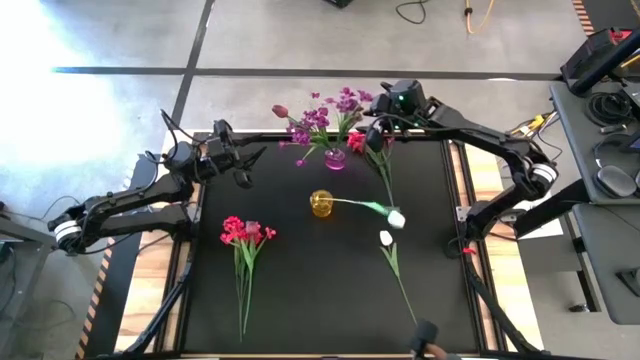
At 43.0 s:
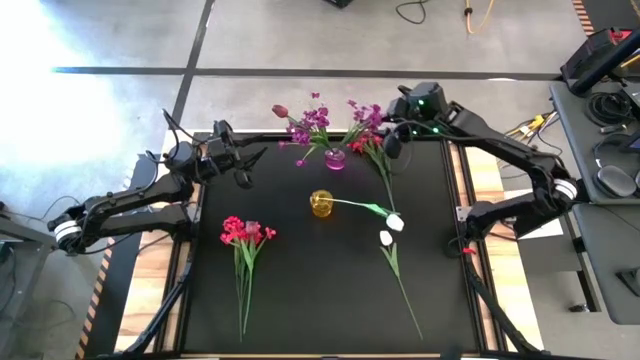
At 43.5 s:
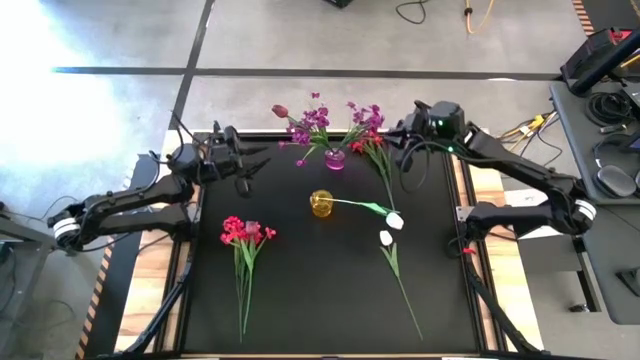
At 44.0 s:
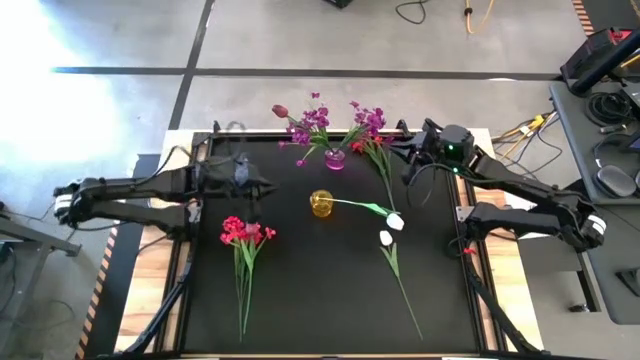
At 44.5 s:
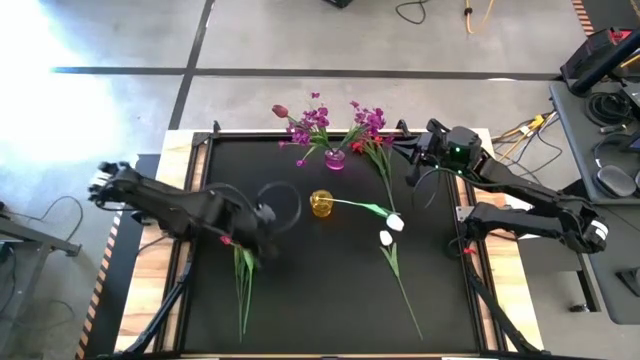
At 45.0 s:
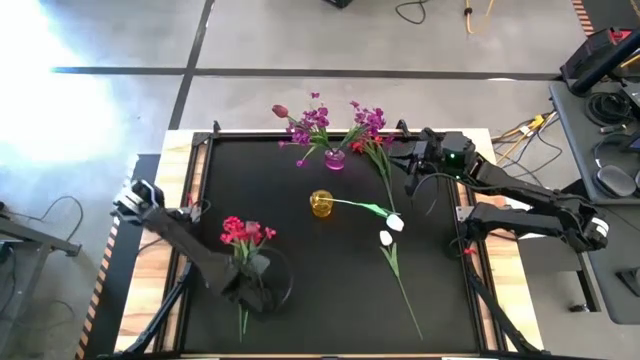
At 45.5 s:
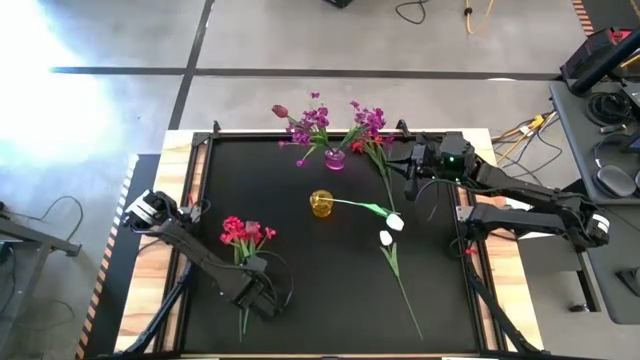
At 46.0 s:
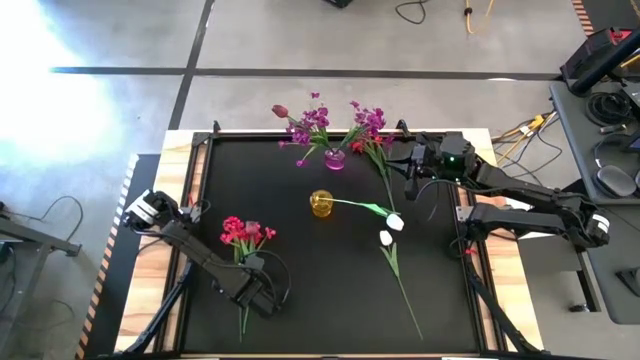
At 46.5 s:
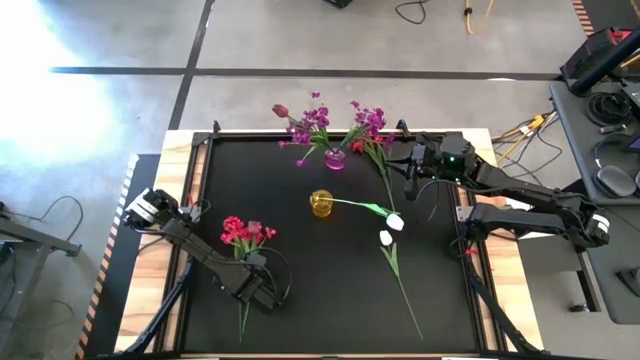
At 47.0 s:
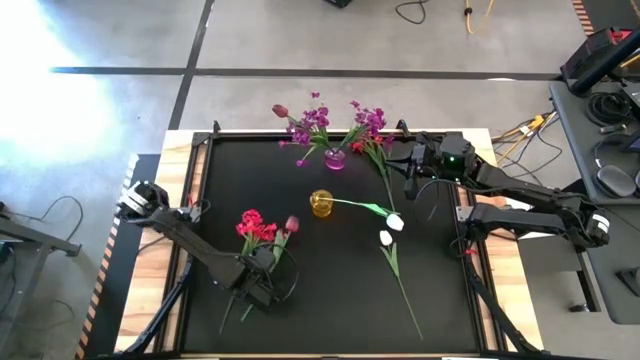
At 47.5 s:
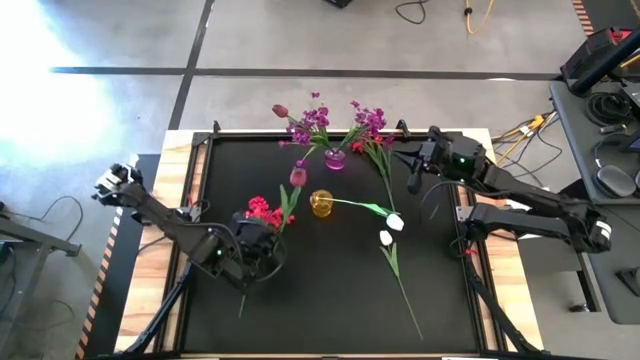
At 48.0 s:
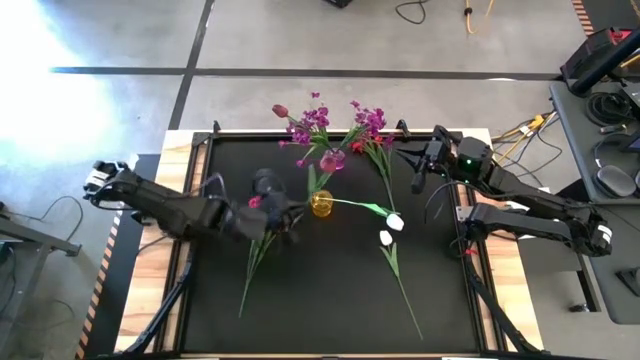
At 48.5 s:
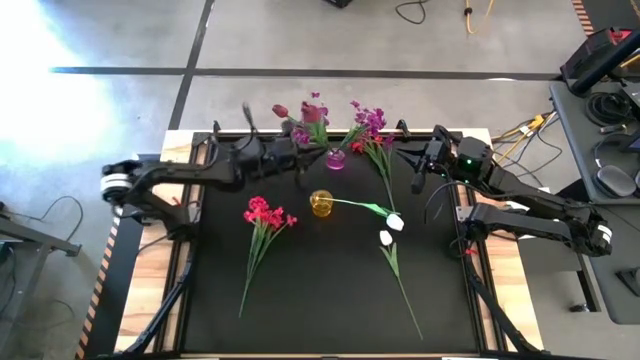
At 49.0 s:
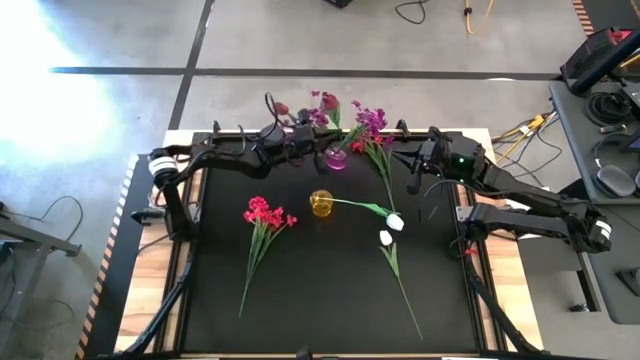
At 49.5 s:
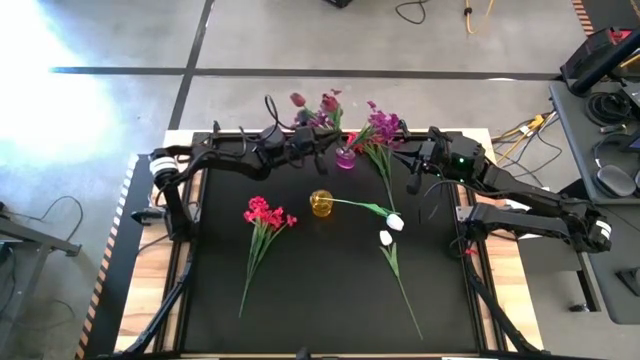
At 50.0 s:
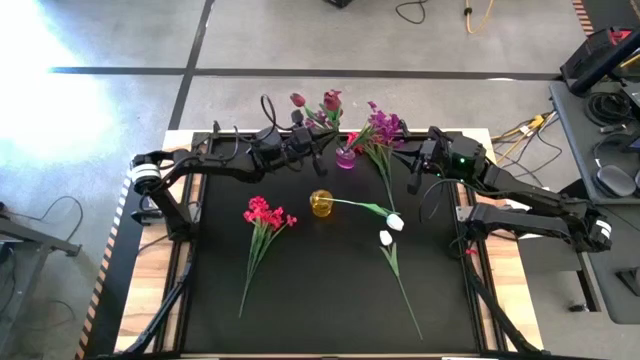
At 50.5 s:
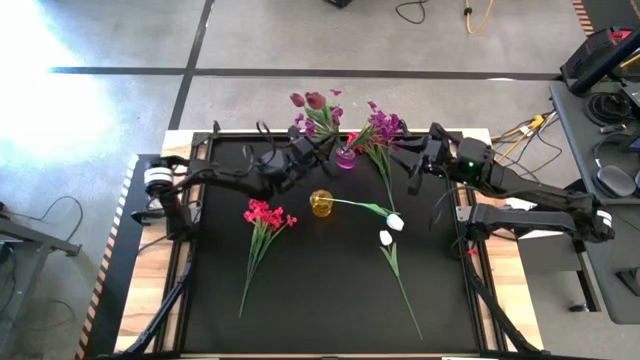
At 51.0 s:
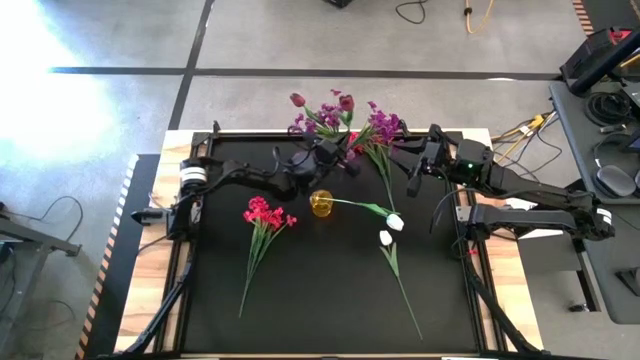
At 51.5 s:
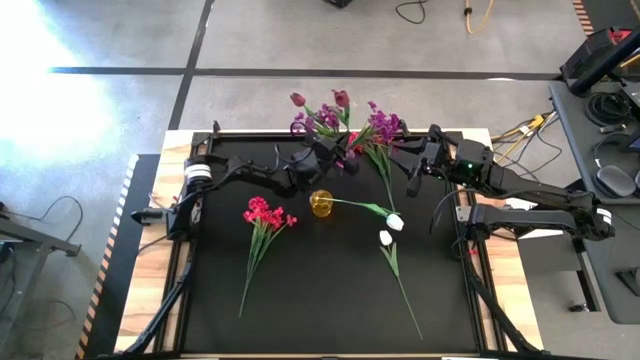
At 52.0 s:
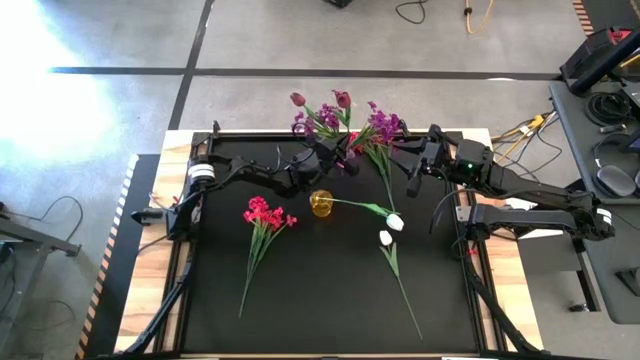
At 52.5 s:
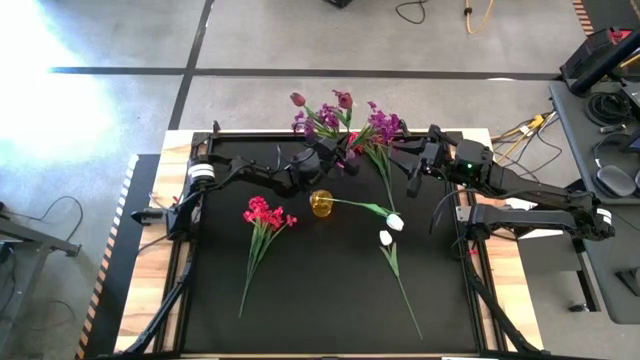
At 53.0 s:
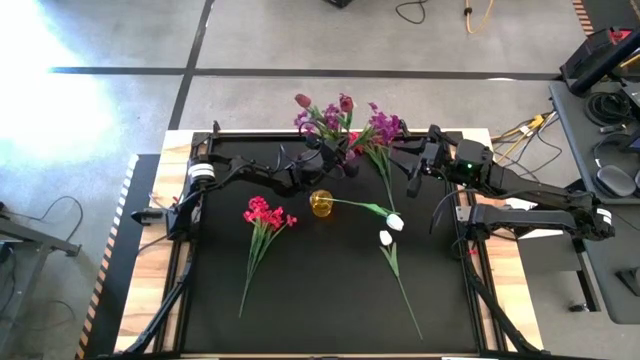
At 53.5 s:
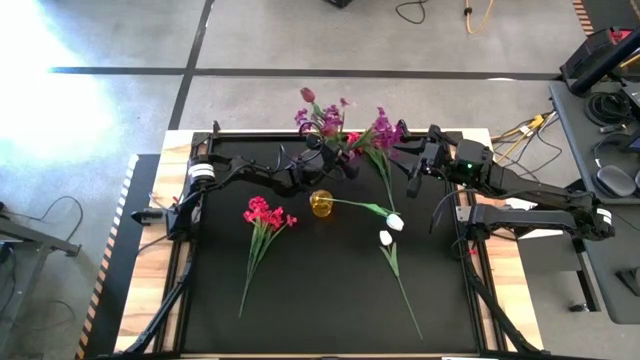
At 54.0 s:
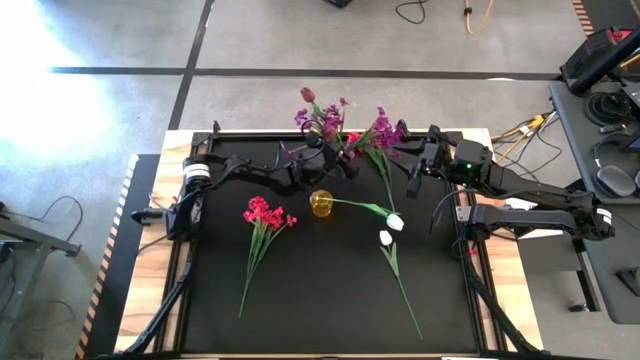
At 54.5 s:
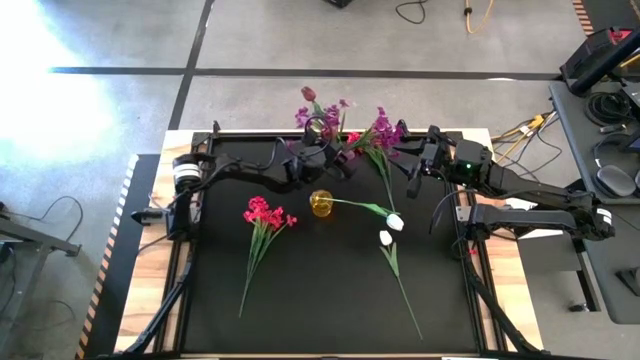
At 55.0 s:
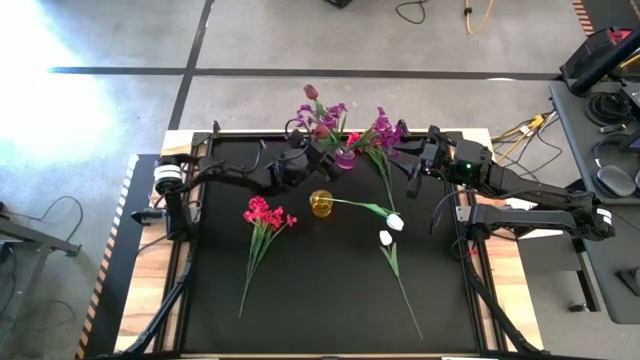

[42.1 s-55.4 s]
Task: Sort flowers into vase by color
Put the red tulip into the violet vase

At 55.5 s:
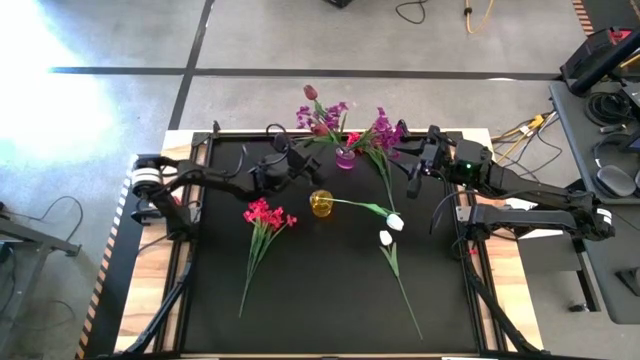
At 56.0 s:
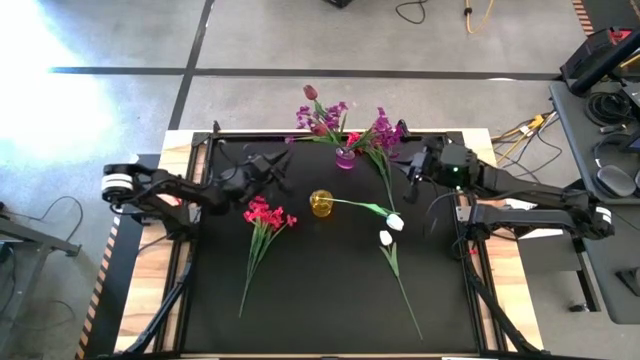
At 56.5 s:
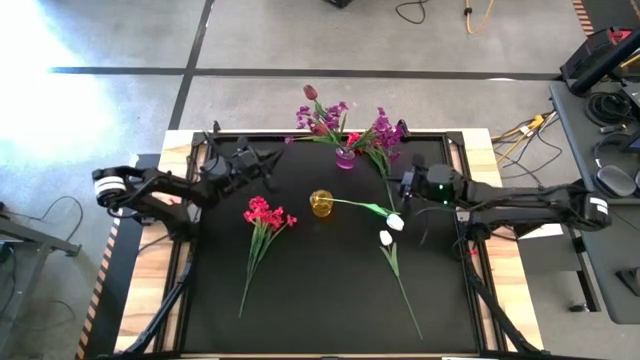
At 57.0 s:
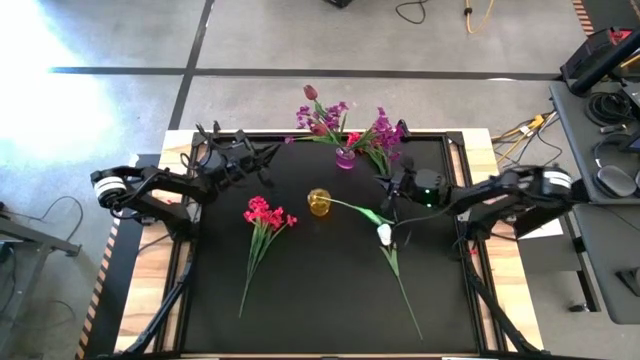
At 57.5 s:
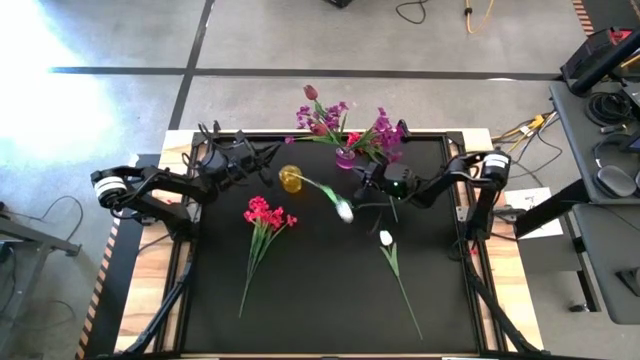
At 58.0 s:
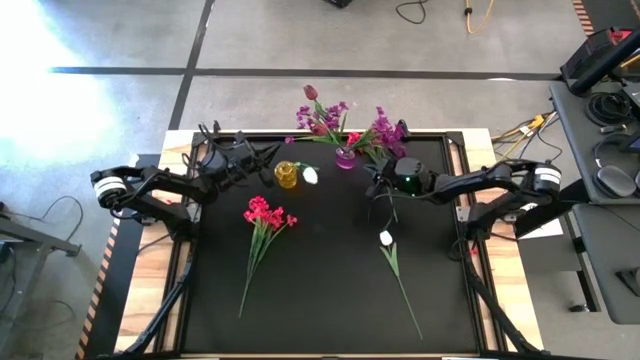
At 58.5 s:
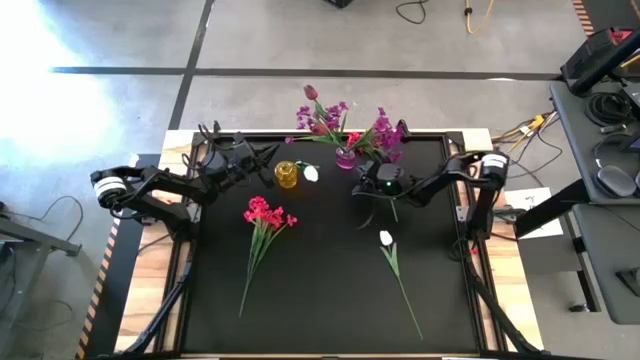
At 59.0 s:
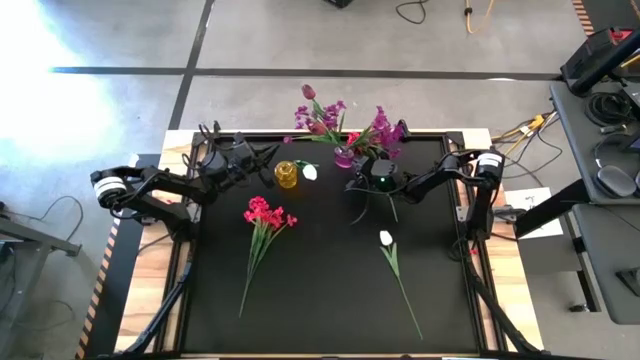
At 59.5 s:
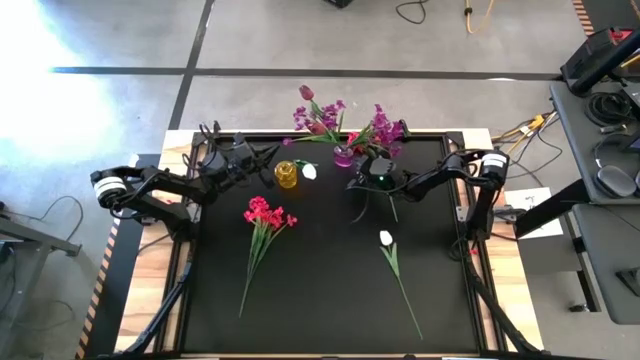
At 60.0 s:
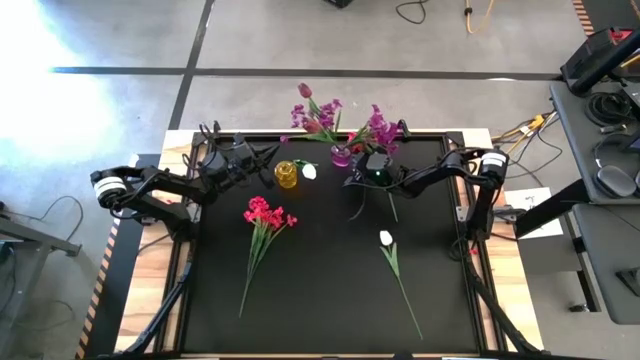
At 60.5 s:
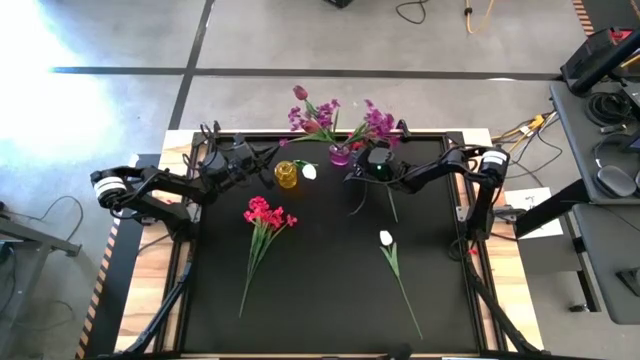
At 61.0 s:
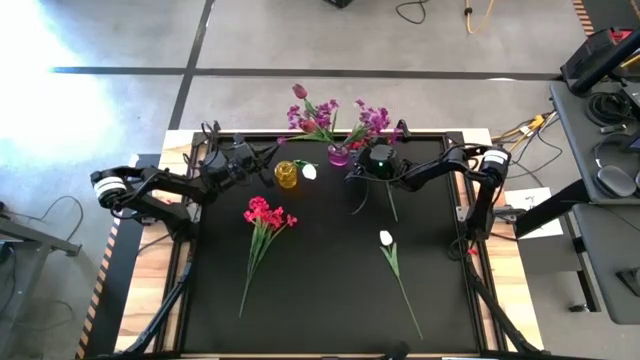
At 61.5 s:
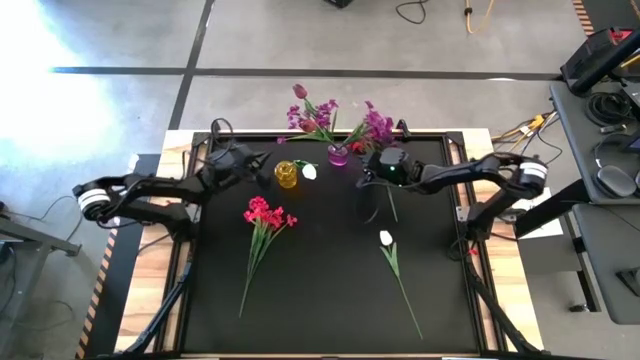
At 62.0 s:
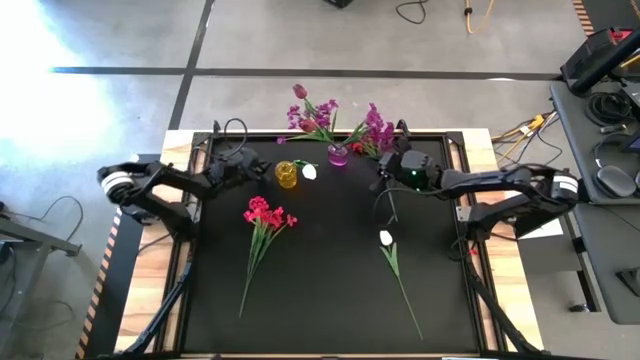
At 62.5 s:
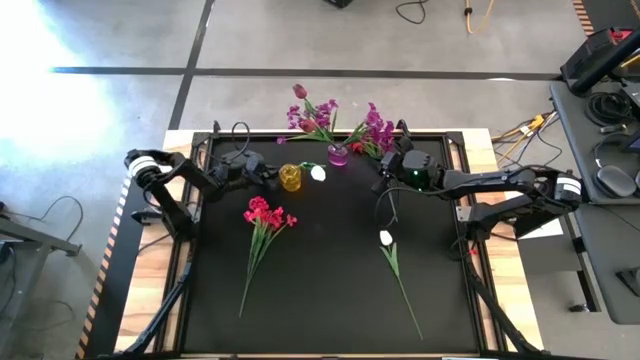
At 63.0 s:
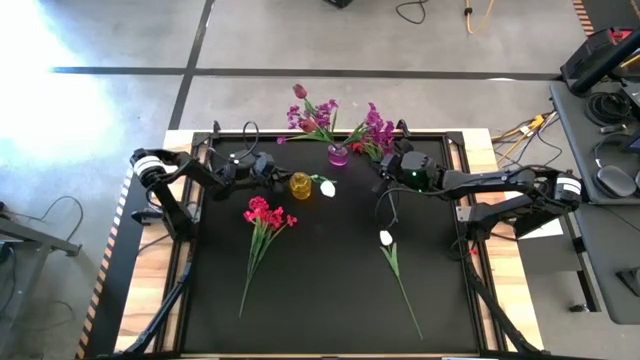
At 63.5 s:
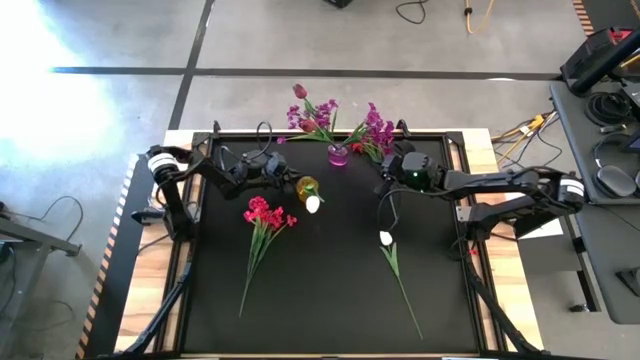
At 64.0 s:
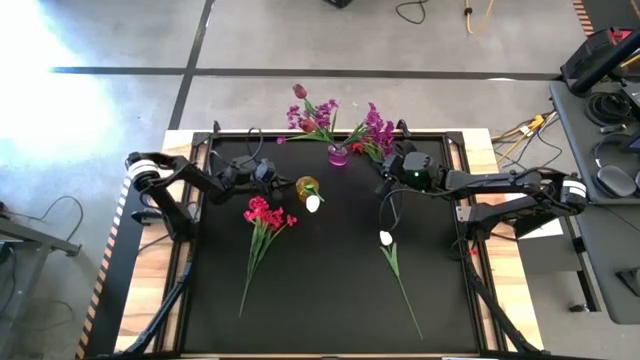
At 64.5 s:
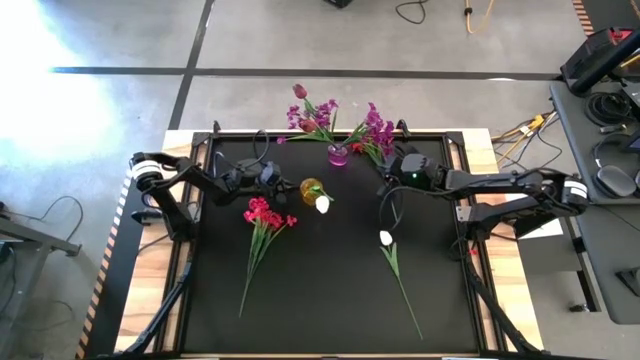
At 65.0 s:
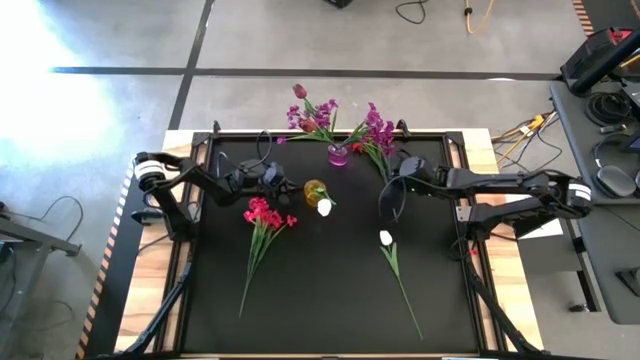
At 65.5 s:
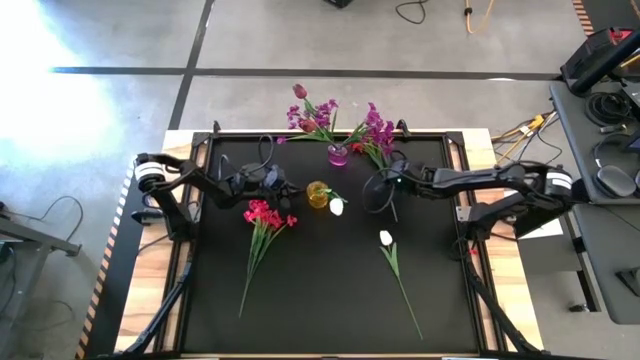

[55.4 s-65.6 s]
Adjust the flower vases
